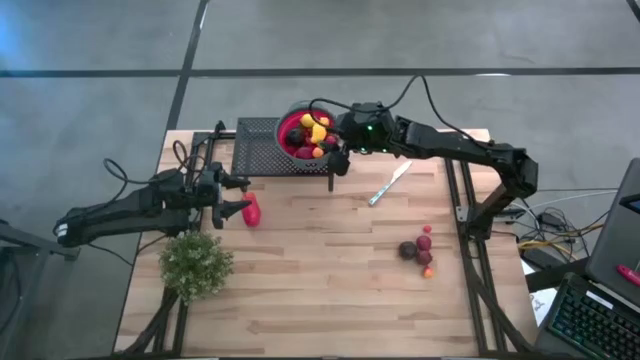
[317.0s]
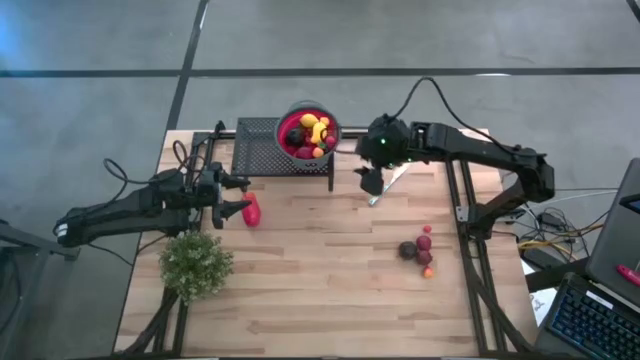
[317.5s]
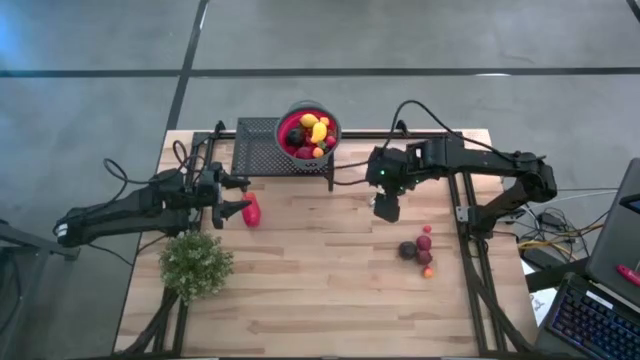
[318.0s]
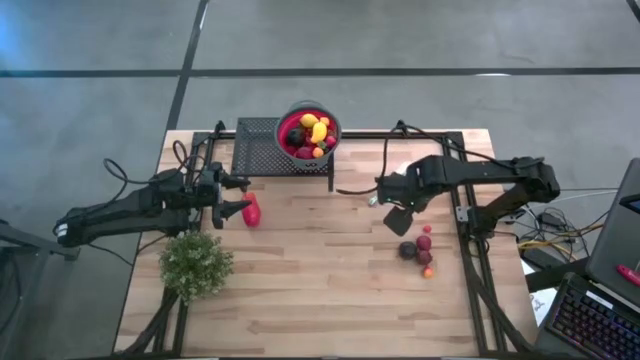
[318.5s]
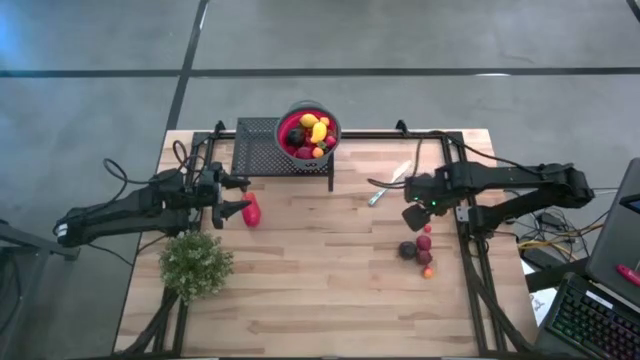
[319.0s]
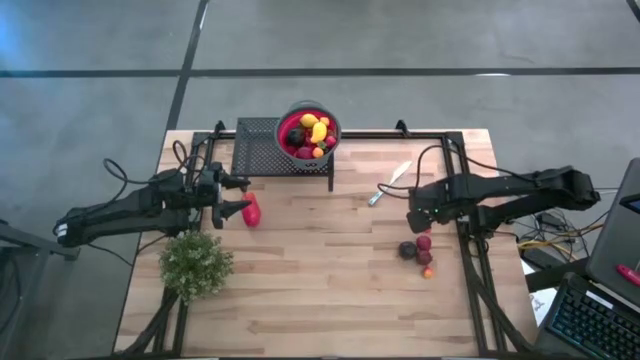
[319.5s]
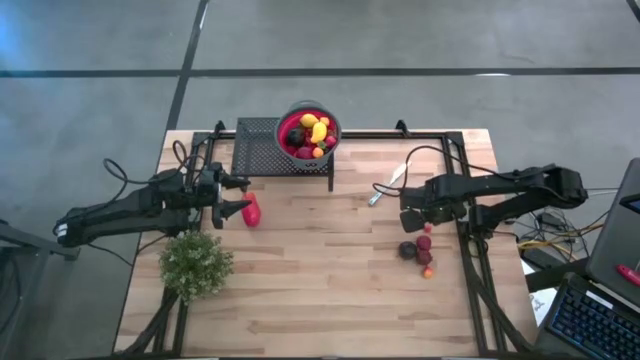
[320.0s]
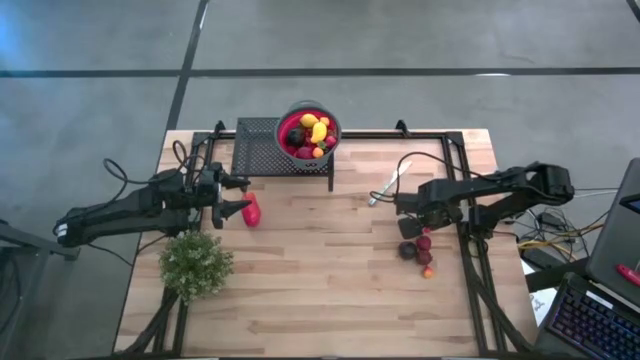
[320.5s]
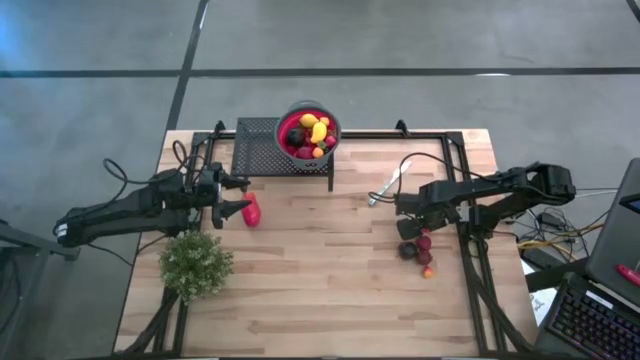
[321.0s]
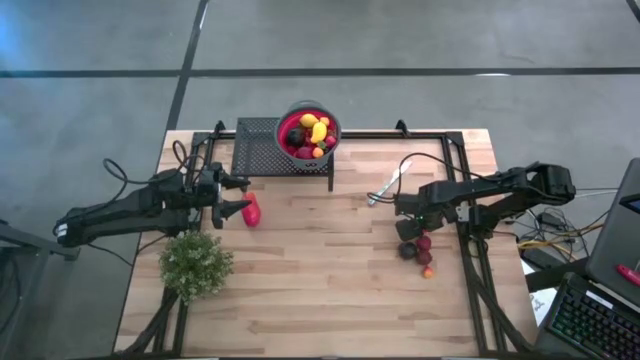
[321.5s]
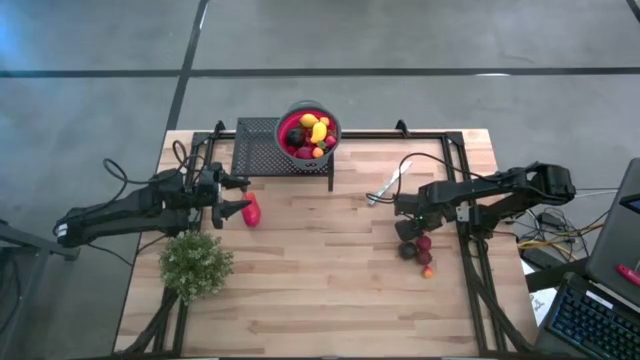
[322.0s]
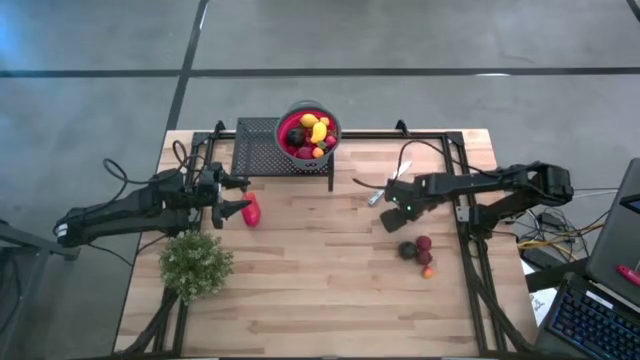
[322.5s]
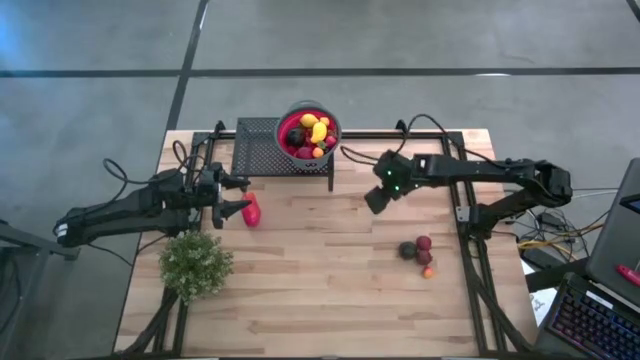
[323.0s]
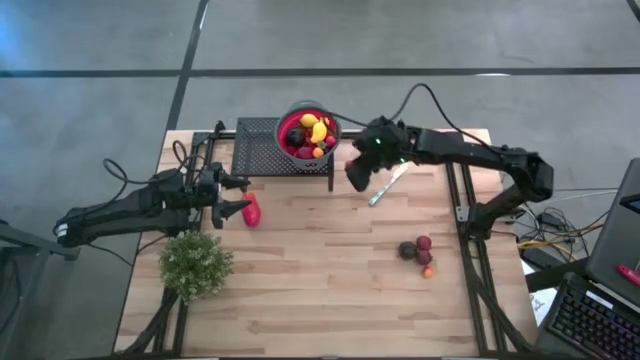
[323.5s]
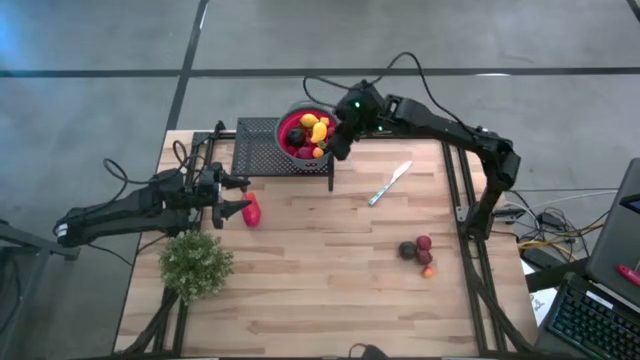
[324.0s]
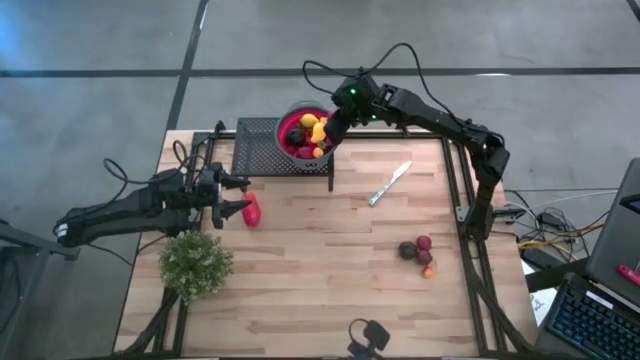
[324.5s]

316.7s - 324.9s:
Task: Pick & Place Fruit
Put the red cherry into the red gray strainer bowl on the shelf

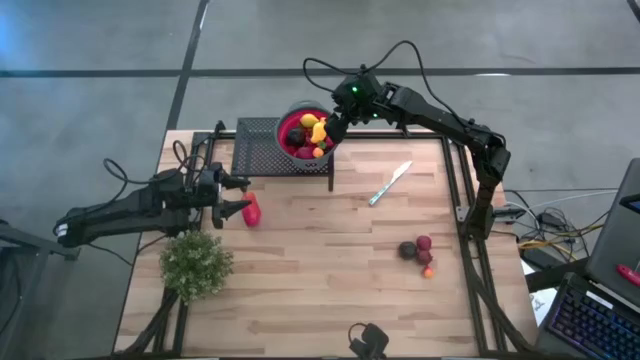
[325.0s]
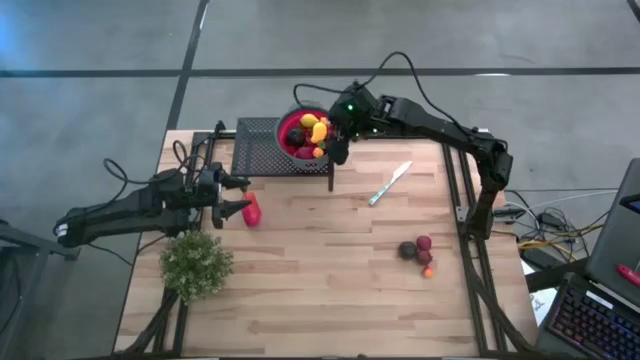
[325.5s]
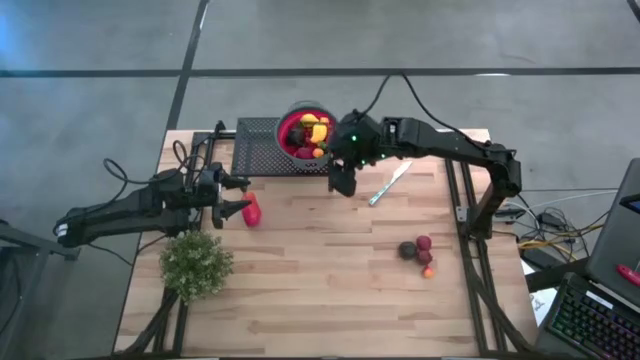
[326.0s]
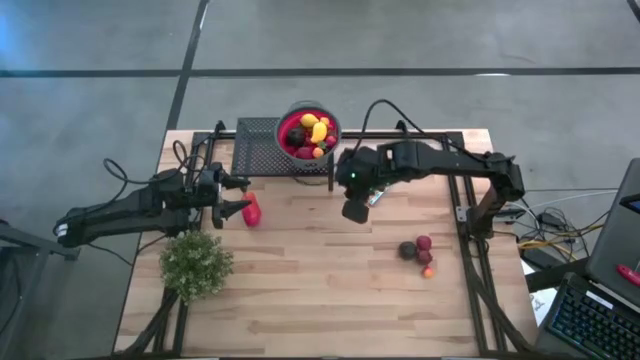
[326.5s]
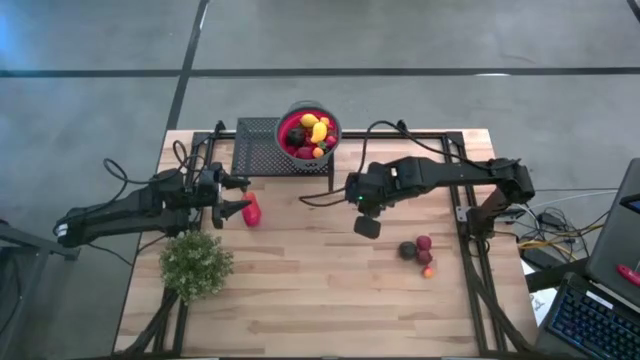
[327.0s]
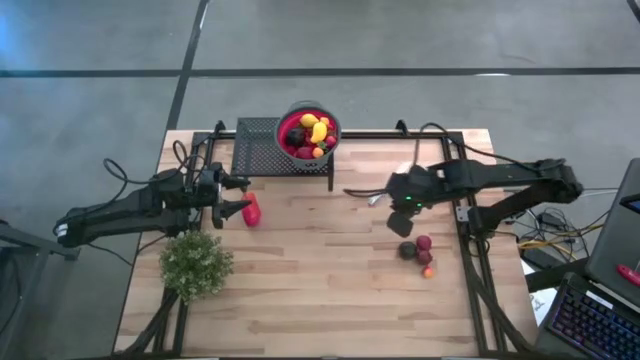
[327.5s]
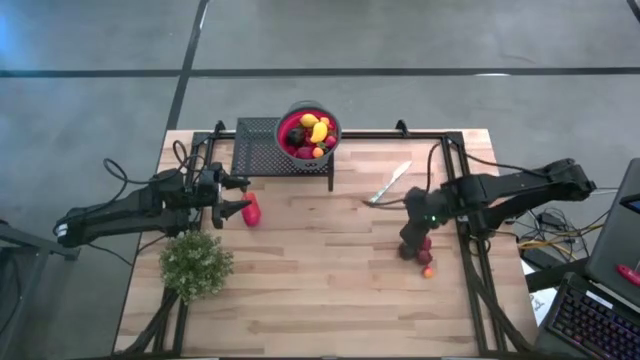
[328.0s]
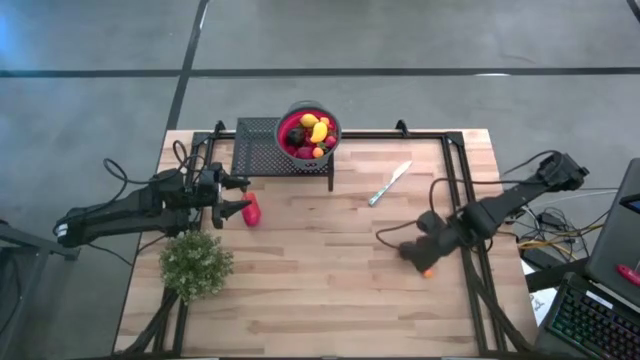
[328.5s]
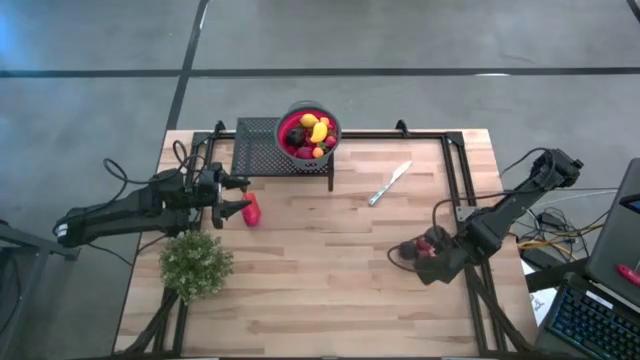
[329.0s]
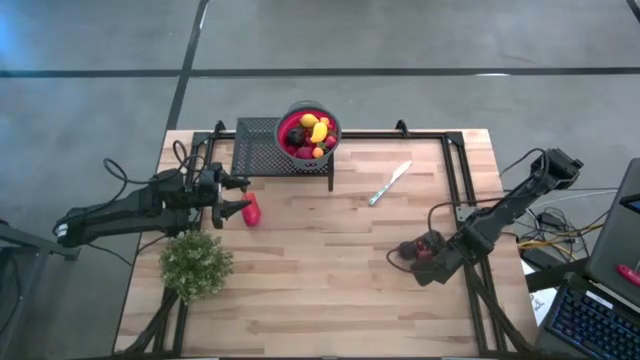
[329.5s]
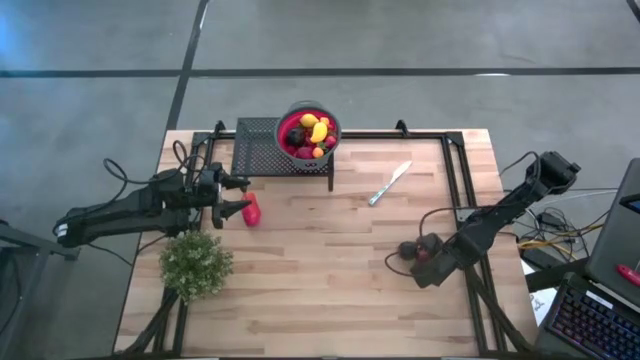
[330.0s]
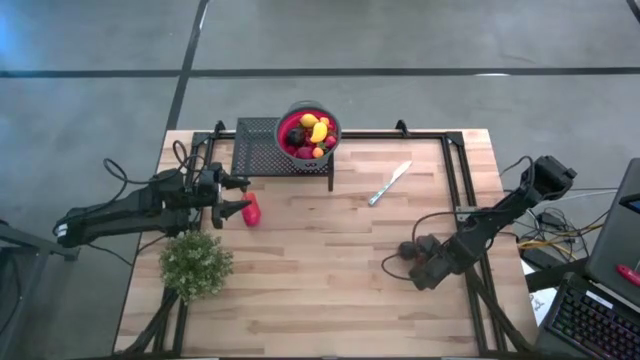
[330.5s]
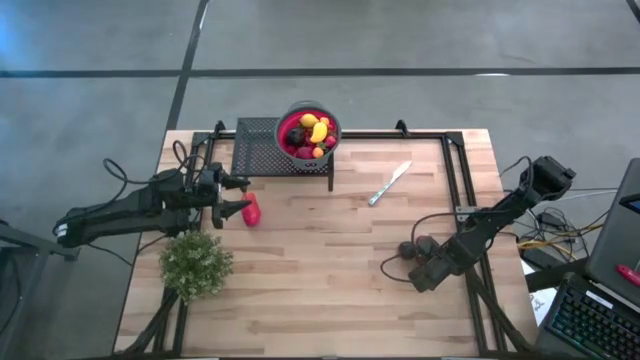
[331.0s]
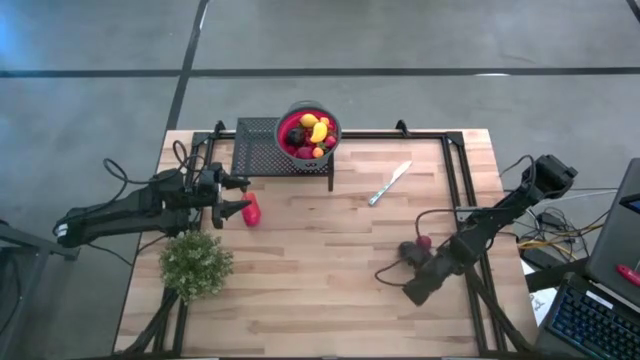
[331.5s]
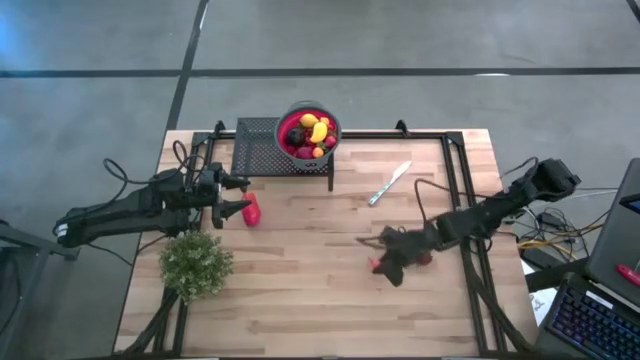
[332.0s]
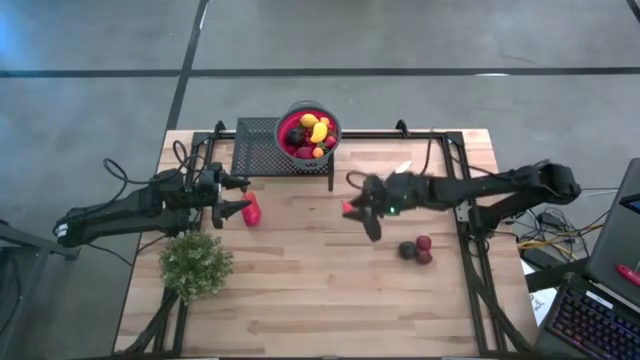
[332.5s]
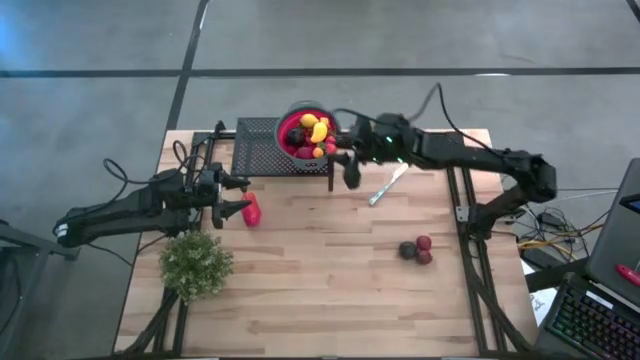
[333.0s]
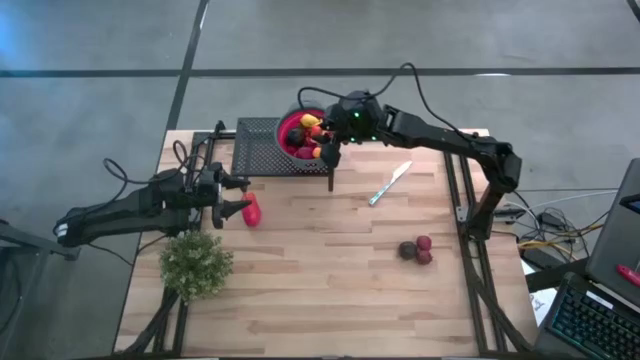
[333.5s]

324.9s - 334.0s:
Put the orange pear into the red gray strainer bowl on the shelf

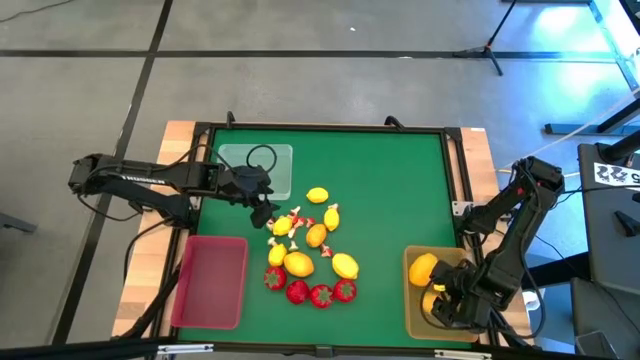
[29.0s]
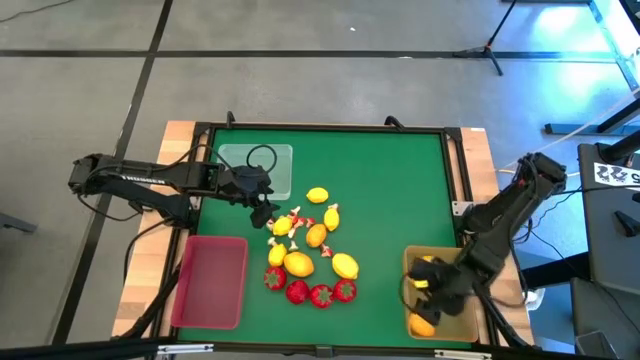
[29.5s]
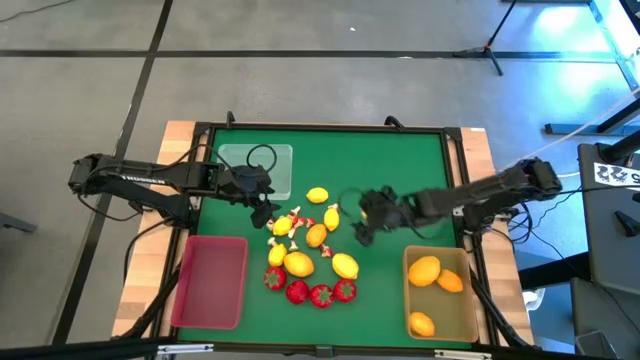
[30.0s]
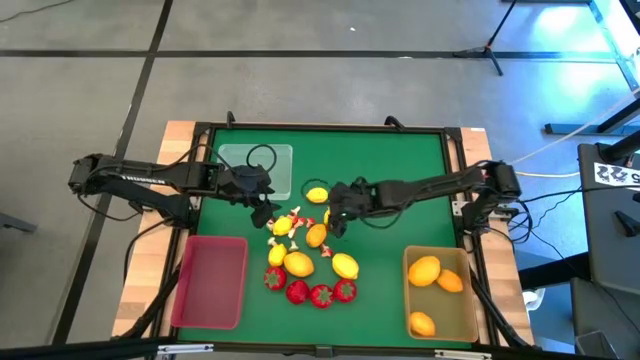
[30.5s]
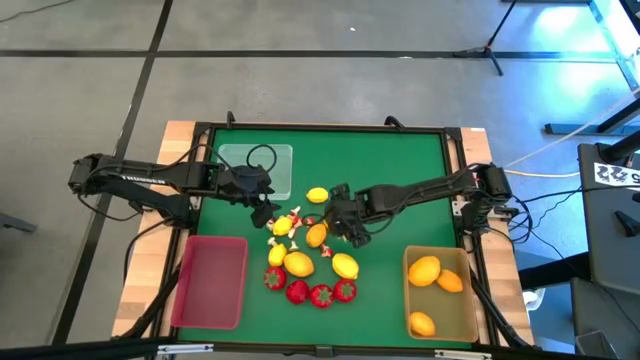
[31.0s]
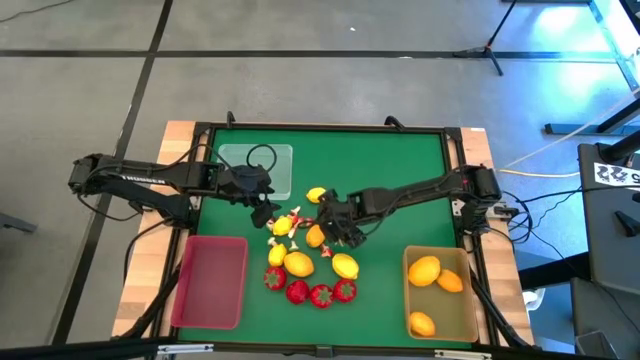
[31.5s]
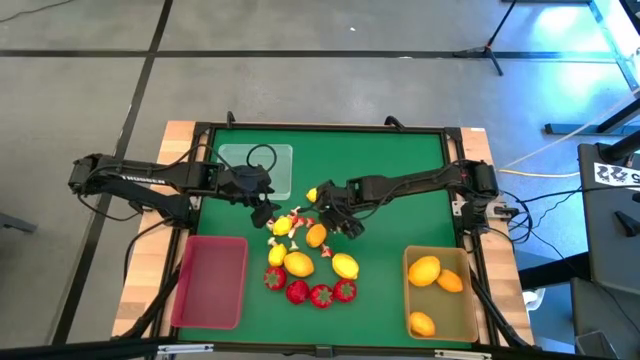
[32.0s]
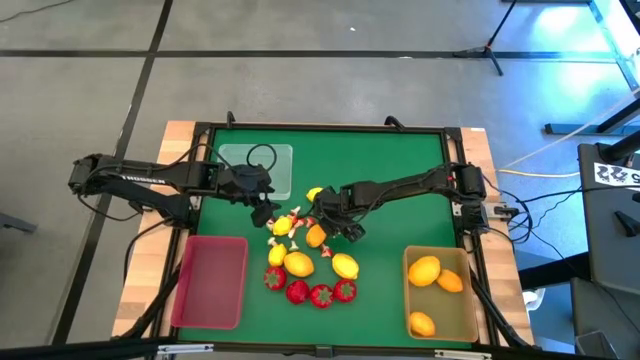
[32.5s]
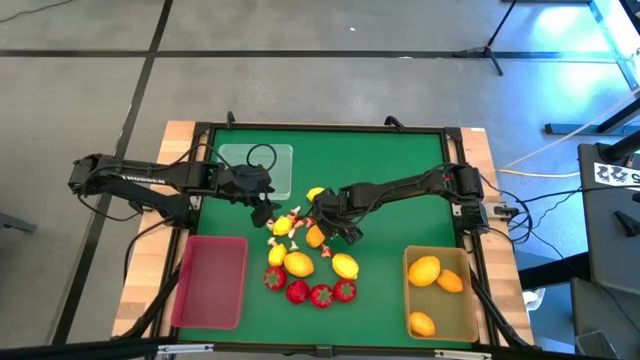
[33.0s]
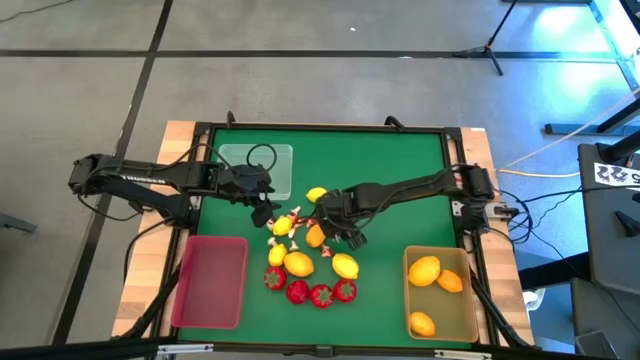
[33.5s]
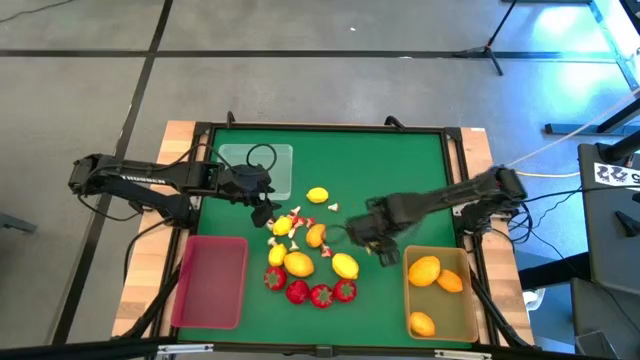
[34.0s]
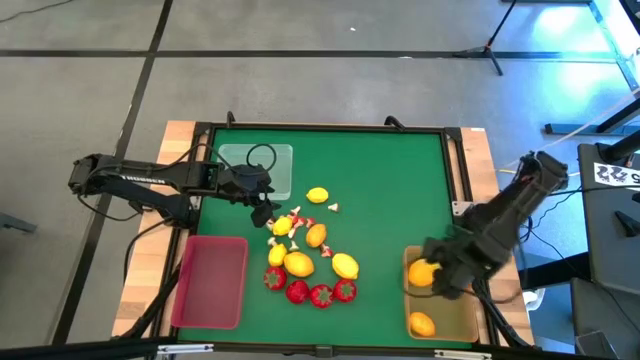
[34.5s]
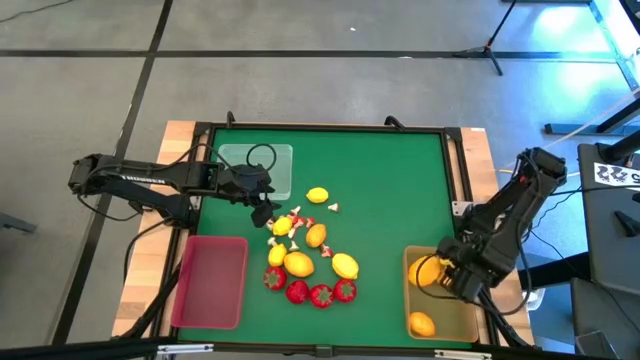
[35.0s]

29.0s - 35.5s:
Task: Sort produce into baskets
Put the lemon into the orange bin
